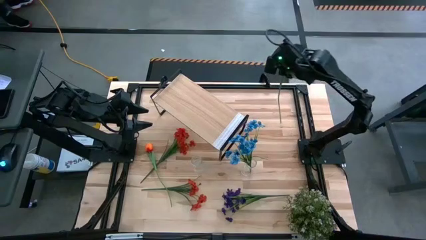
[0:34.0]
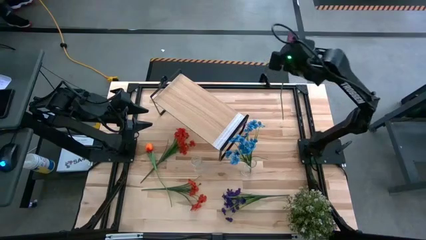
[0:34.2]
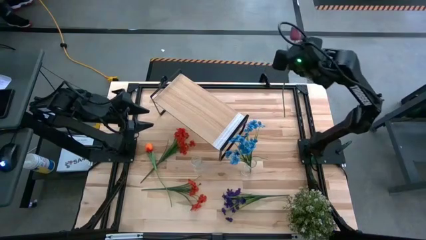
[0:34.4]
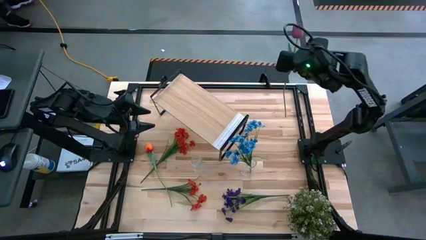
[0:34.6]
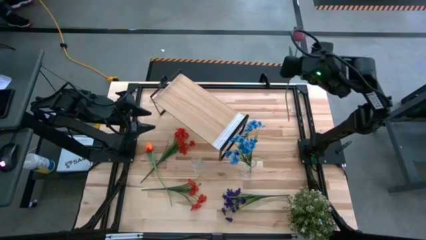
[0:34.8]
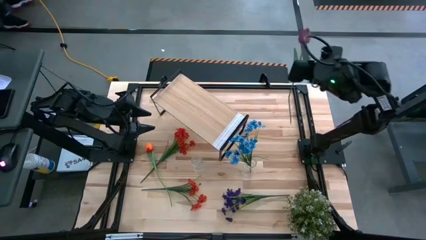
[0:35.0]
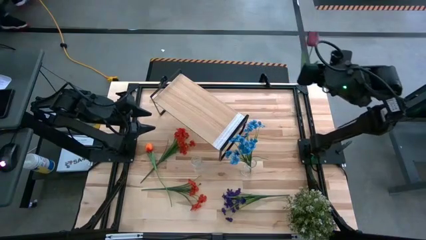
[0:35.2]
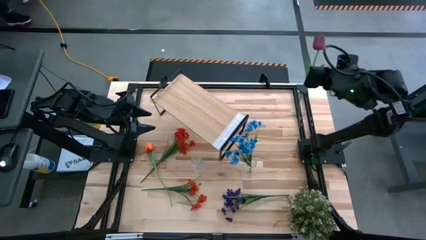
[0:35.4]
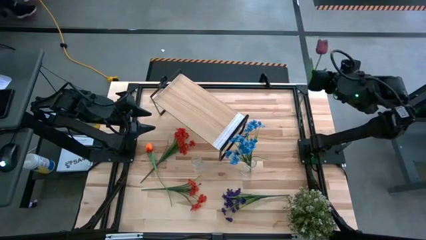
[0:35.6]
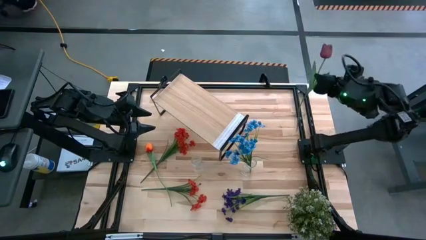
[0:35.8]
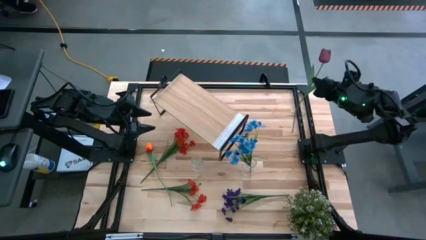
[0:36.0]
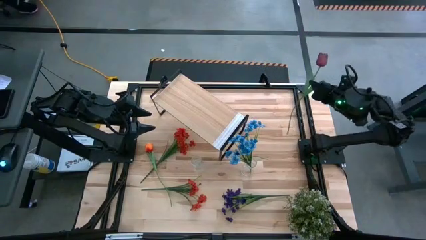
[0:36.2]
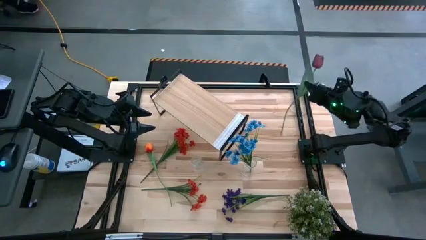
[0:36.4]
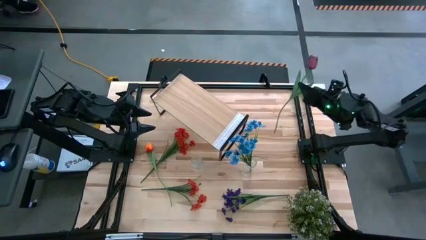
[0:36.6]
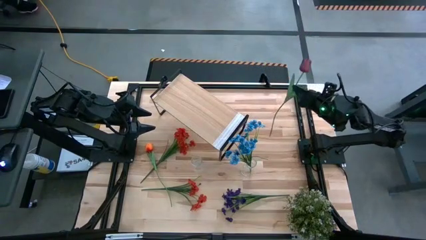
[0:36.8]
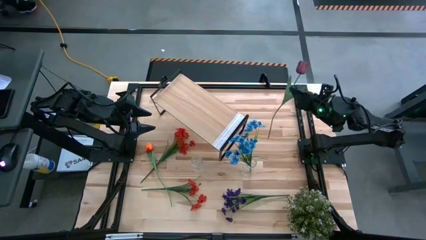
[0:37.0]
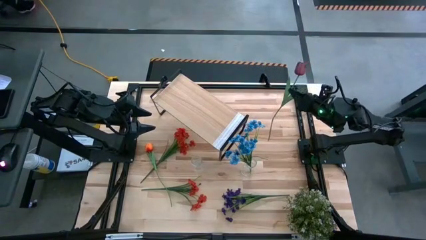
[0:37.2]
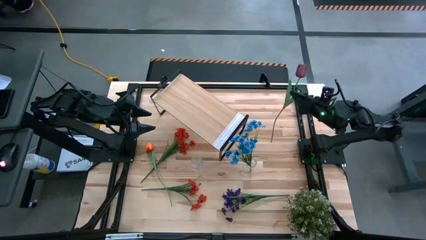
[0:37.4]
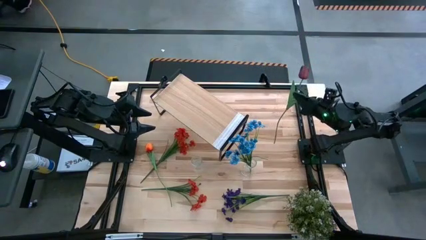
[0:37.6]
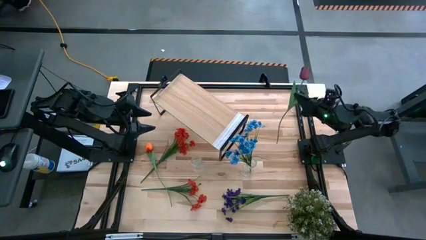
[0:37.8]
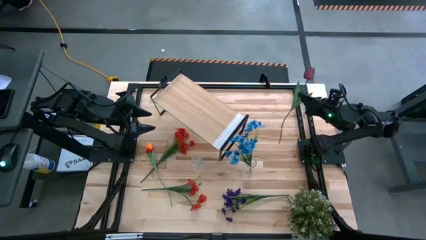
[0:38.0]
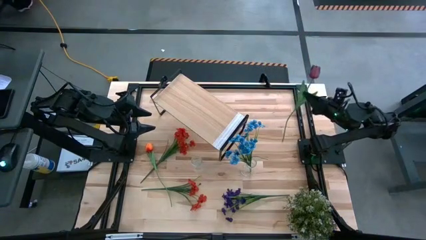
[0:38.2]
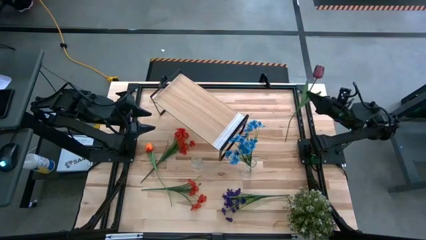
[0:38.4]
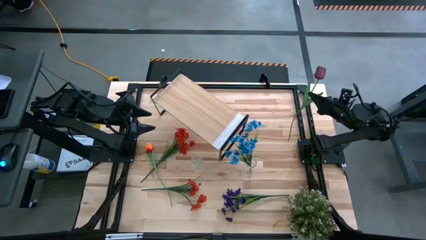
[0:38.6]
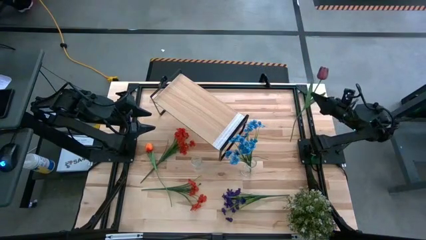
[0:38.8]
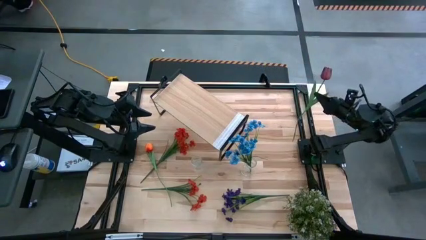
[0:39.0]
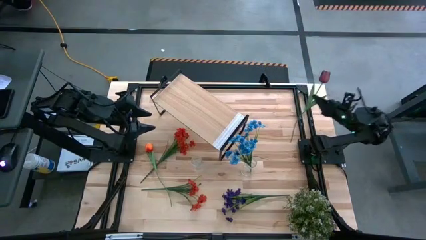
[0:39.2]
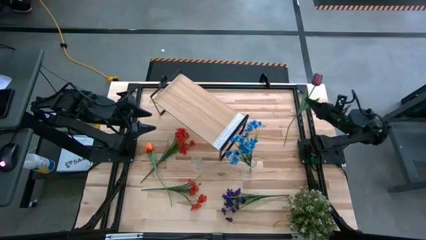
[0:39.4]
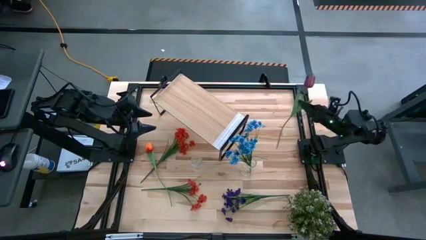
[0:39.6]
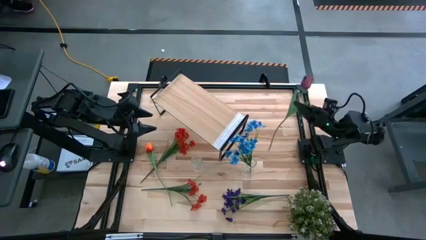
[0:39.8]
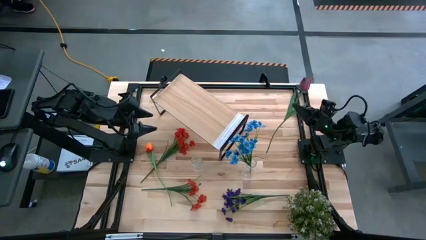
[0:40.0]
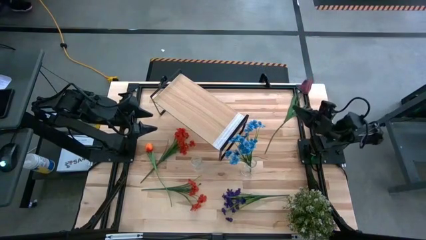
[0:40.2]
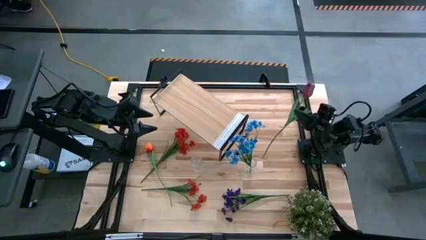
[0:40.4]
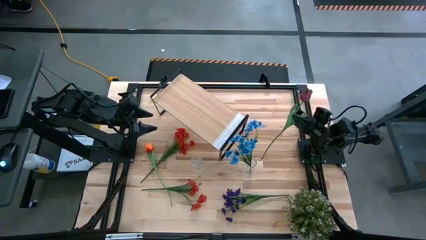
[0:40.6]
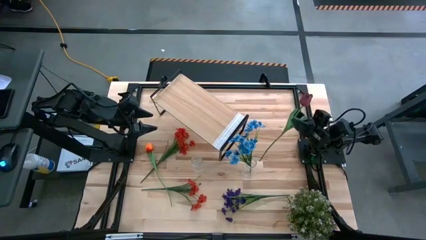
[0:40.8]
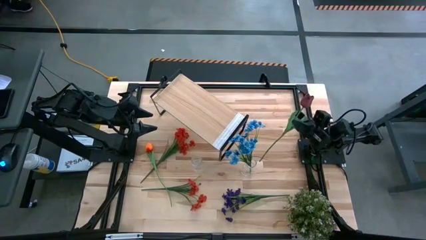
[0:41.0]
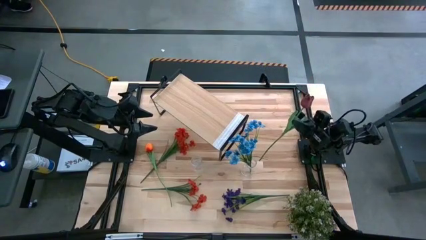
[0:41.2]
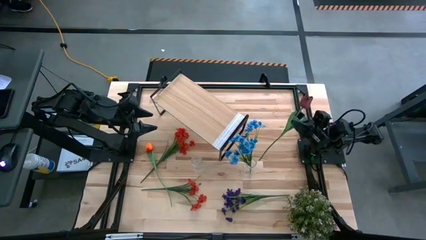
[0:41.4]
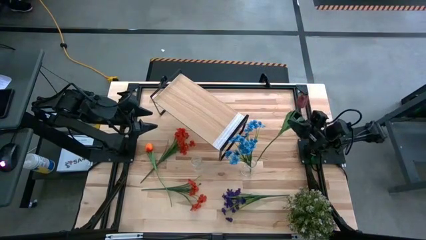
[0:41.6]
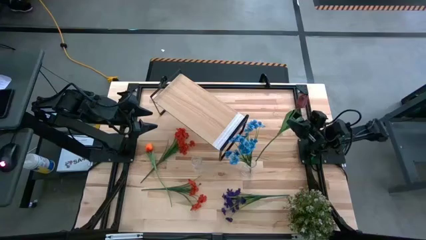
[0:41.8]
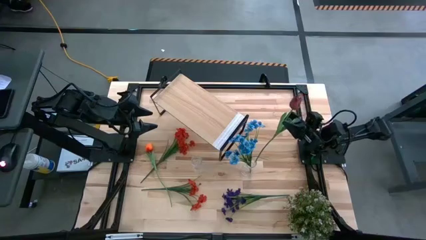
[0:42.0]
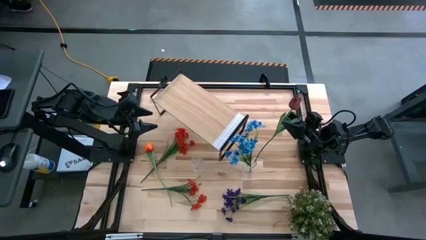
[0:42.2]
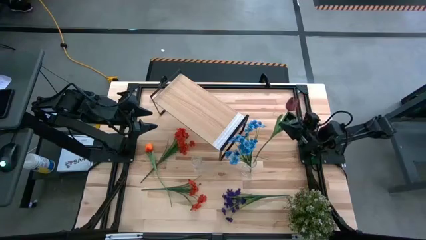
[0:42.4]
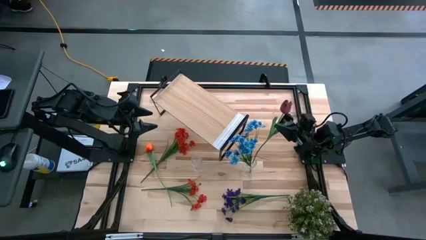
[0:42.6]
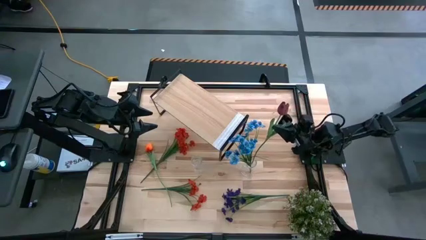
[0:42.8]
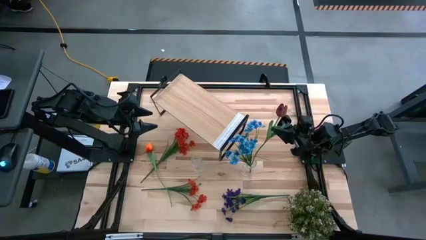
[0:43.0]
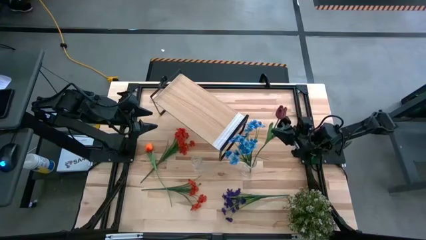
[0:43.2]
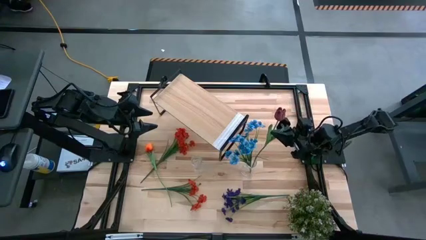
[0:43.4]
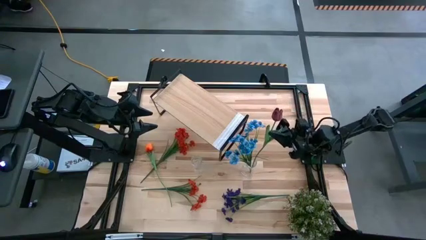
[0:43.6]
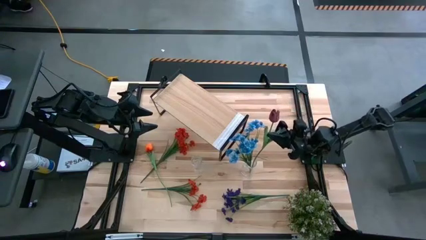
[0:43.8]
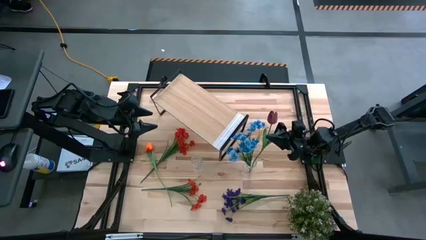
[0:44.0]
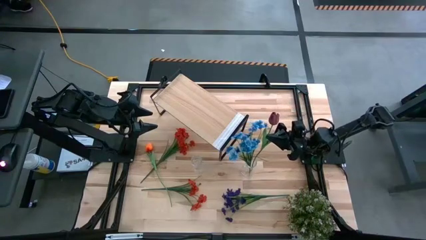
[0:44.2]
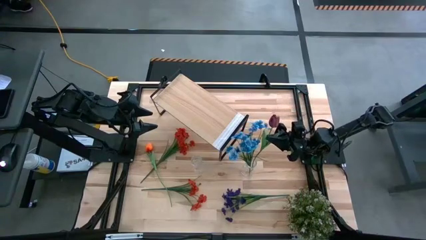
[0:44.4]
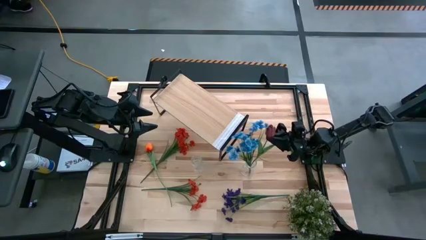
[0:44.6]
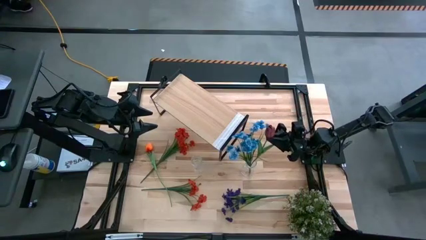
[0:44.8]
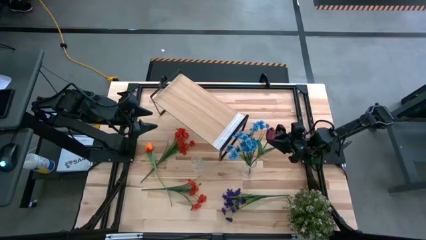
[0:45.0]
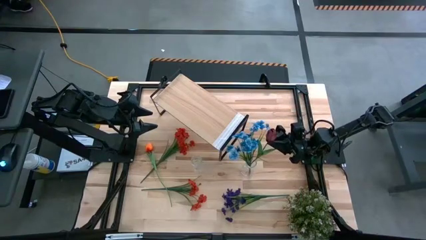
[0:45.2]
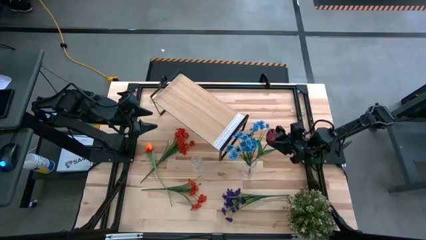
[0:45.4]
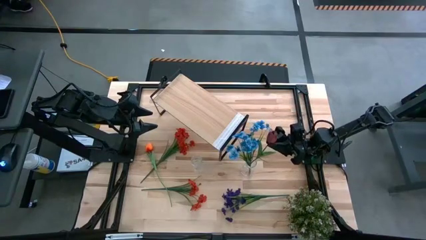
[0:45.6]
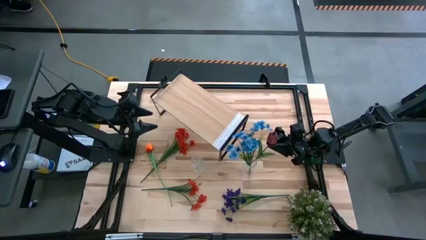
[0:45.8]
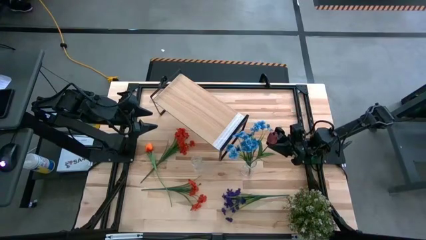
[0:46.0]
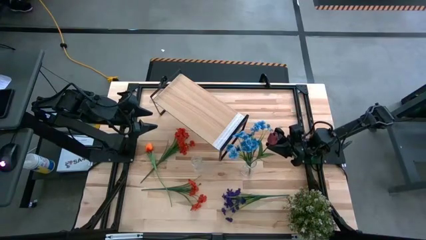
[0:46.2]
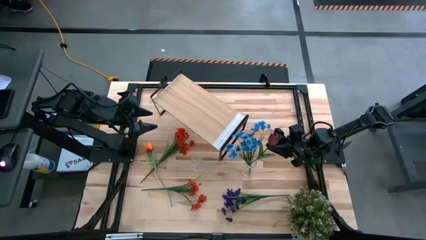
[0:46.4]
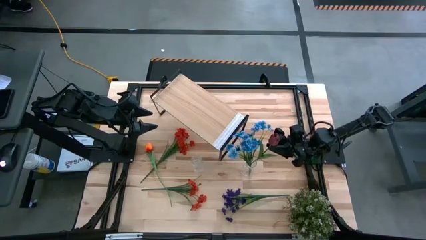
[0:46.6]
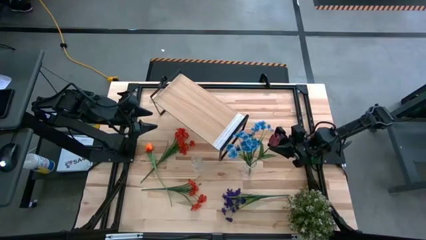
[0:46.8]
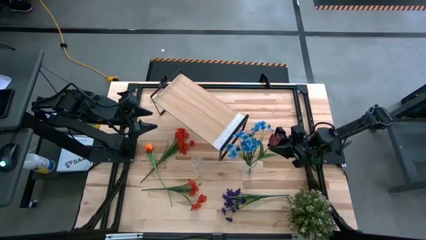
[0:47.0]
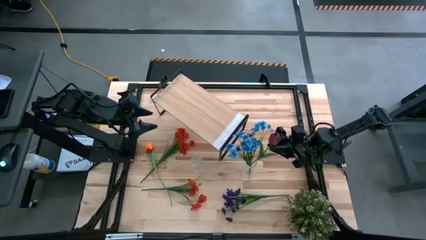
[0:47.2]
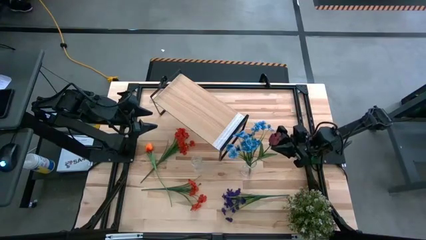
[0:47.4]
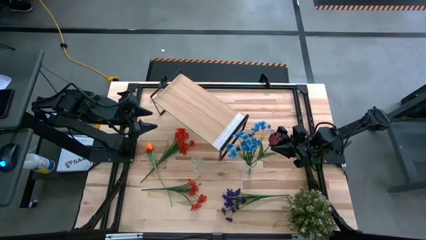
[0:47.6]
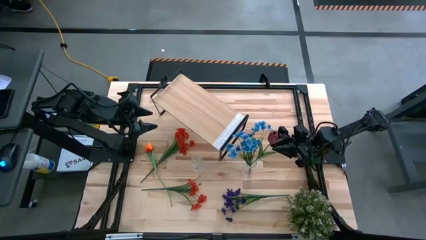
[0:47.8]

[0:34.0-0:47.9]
Task: Pick and place flowers into a vace then onto a shelf
Put the pink flower into the right transparent vase

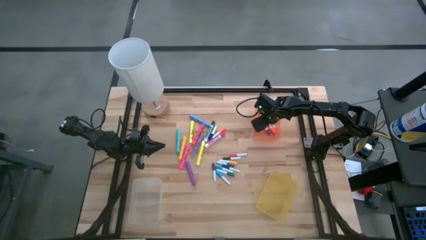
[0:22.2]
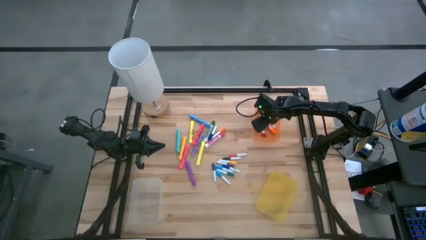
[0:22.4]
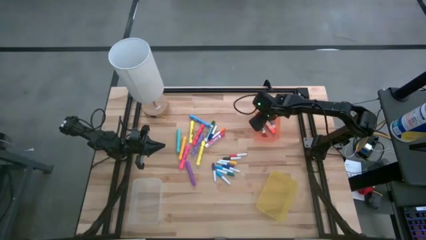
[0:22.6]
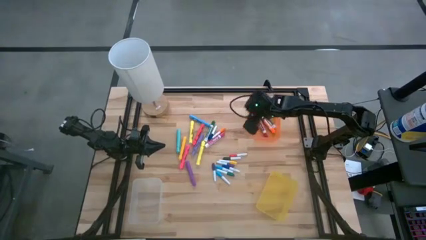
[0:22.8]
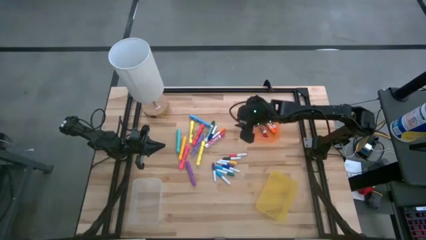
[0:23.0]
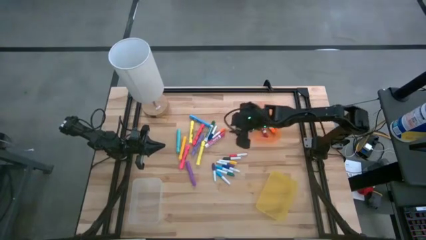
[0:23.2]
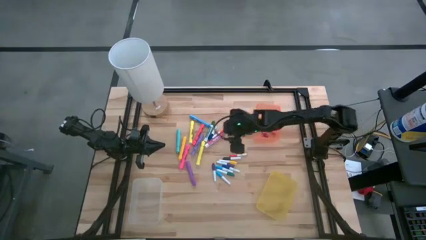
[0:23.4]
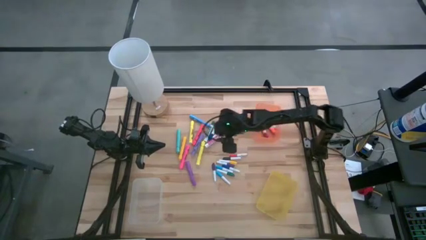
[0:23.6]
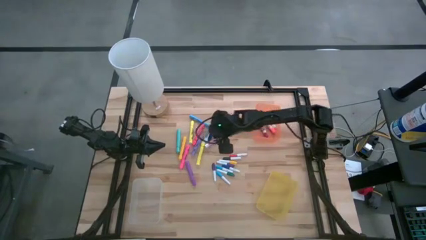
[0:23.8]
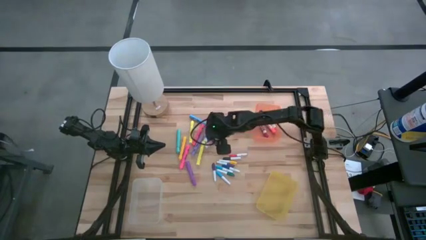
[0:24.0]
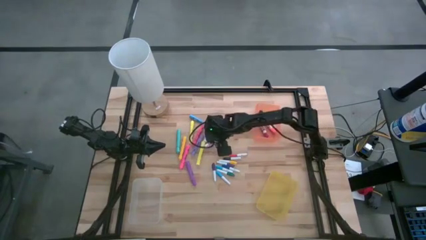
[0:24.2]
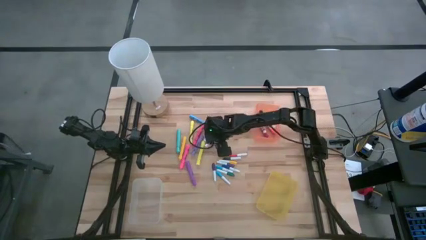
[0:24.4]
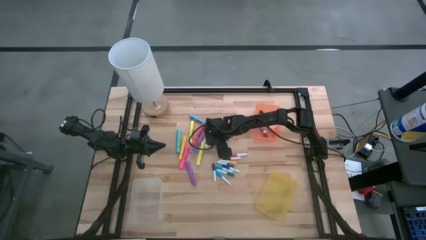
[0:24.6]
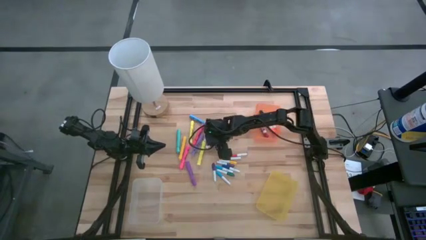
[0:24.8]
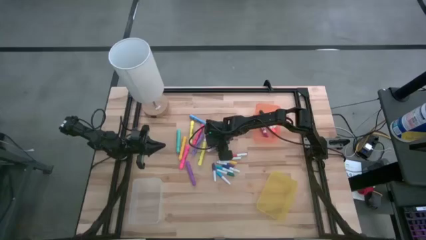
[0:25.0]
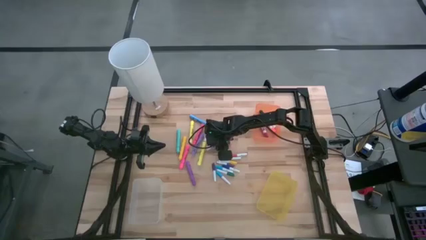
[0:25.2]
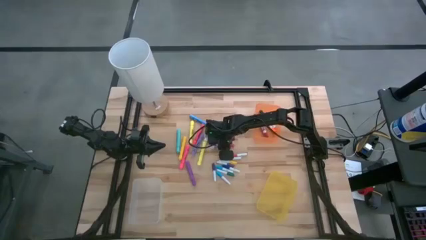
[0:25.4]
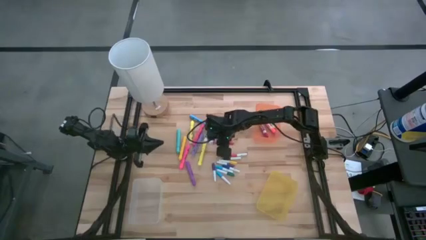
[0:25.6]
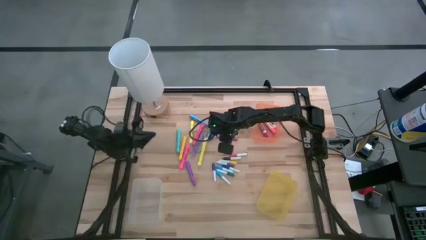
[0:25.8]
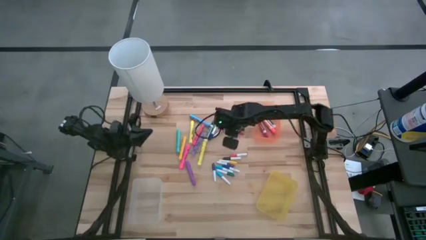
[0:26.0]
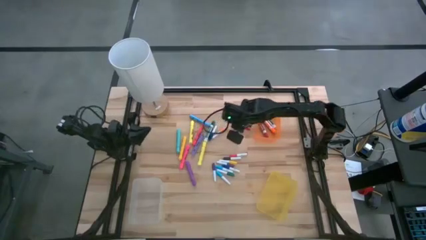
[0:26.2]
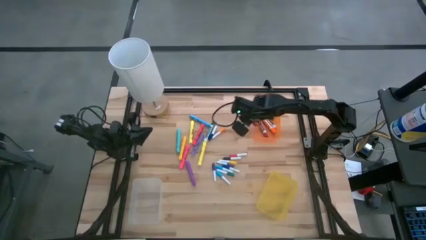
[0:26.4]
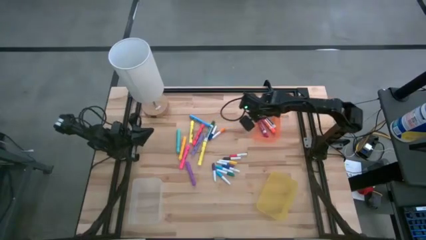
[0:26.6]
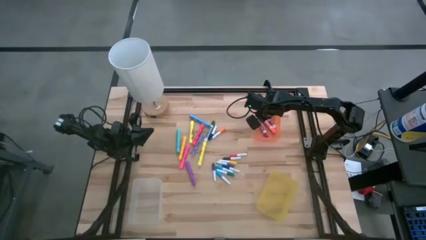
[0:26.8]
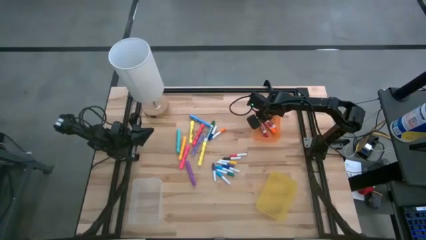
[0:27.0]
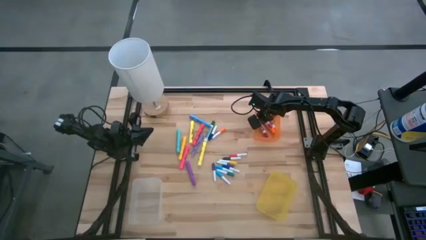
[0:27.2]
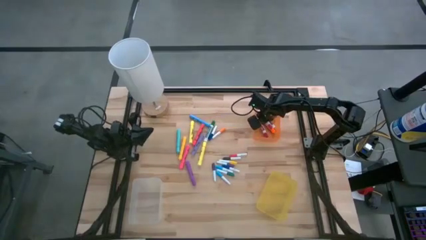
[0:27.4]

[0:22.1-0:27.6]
Task: Pick & Place Markers
Put the pink eraser marker into the orange bin
